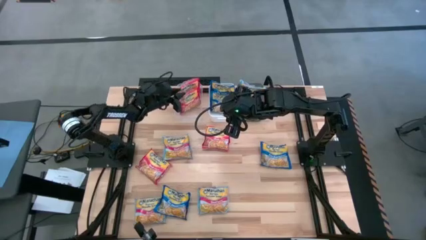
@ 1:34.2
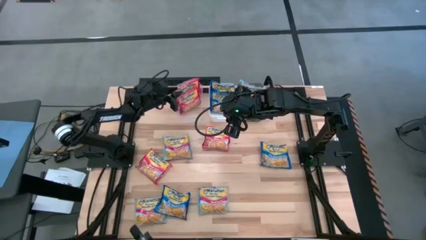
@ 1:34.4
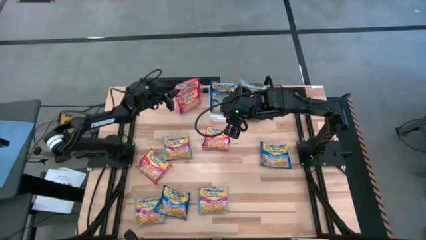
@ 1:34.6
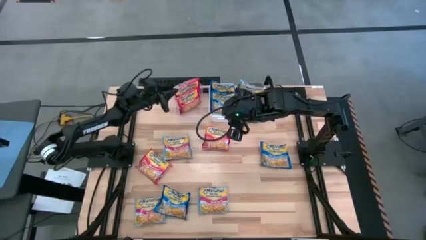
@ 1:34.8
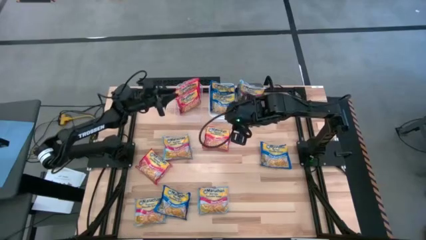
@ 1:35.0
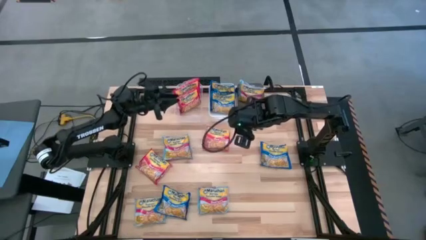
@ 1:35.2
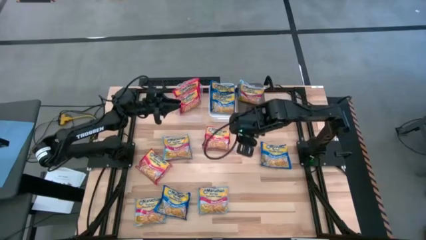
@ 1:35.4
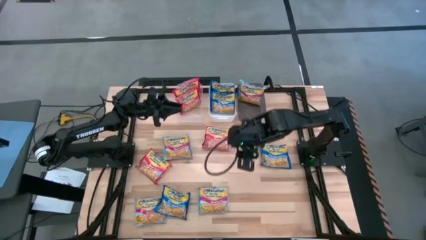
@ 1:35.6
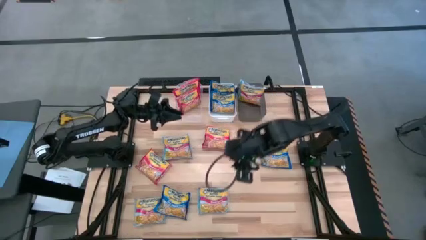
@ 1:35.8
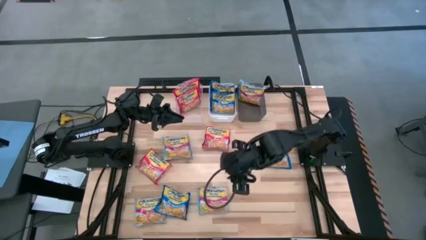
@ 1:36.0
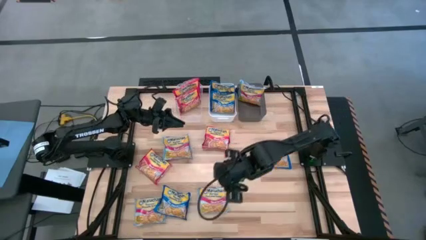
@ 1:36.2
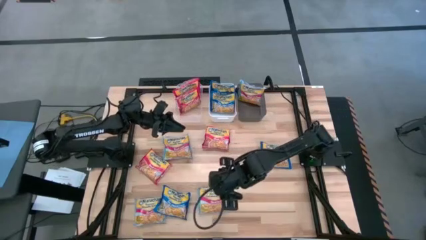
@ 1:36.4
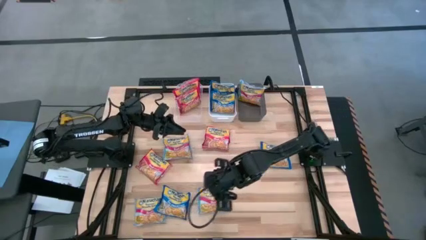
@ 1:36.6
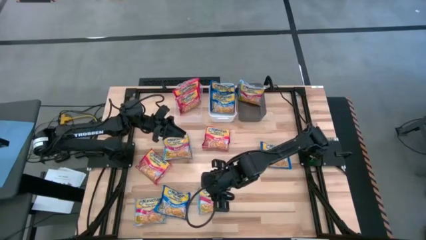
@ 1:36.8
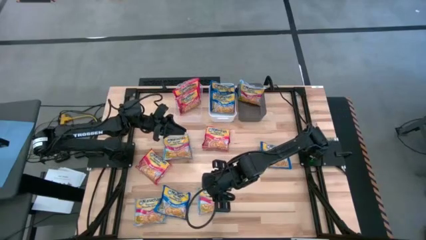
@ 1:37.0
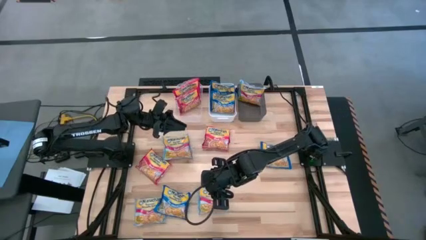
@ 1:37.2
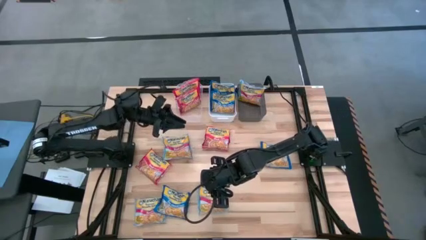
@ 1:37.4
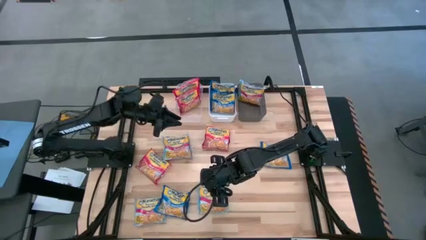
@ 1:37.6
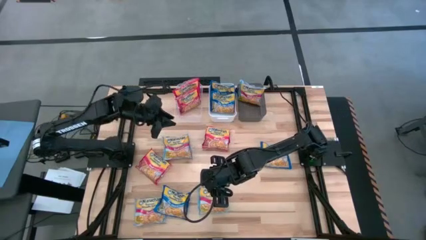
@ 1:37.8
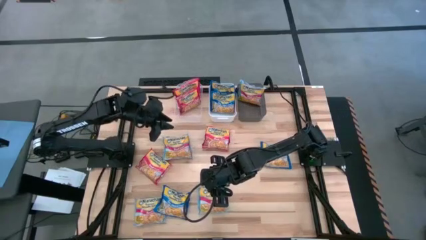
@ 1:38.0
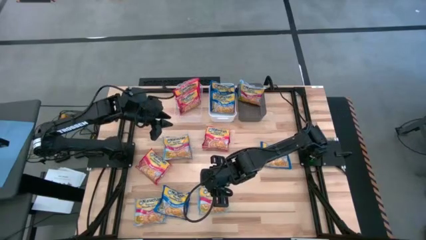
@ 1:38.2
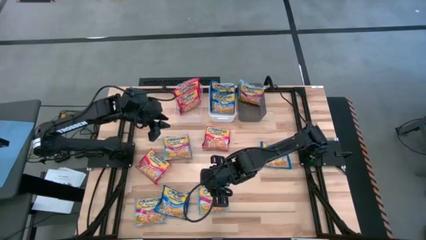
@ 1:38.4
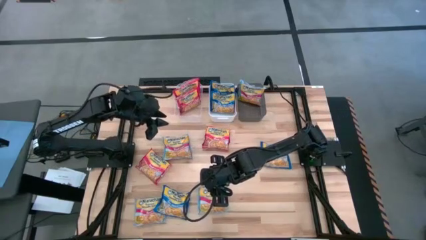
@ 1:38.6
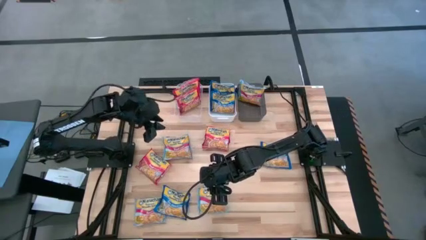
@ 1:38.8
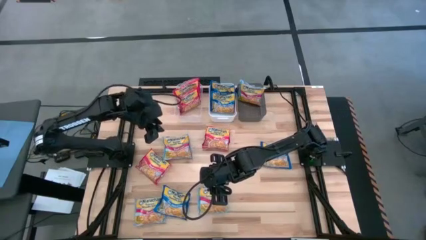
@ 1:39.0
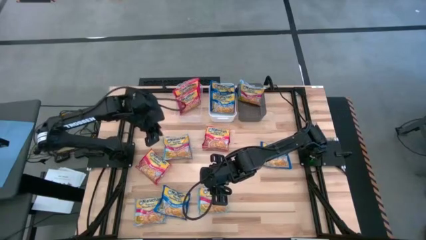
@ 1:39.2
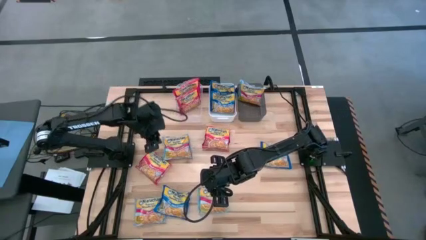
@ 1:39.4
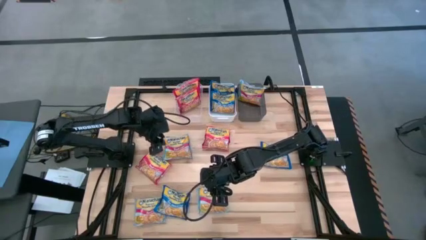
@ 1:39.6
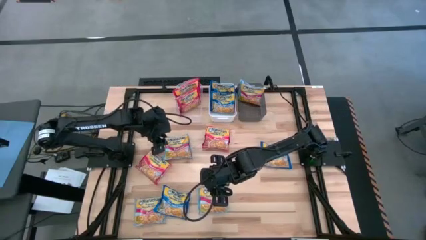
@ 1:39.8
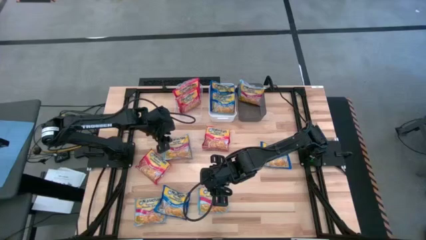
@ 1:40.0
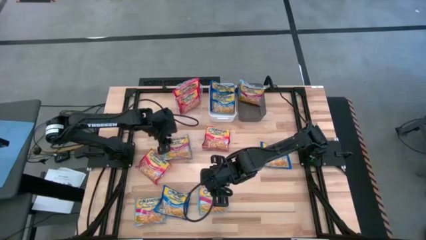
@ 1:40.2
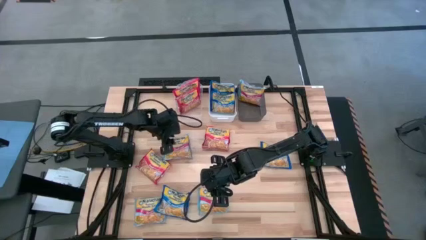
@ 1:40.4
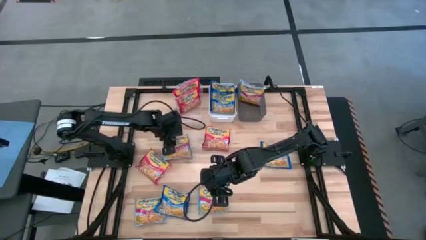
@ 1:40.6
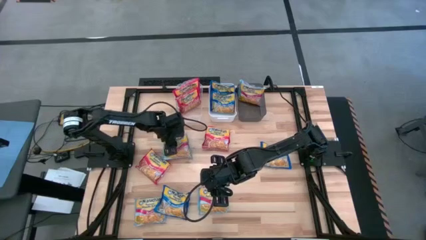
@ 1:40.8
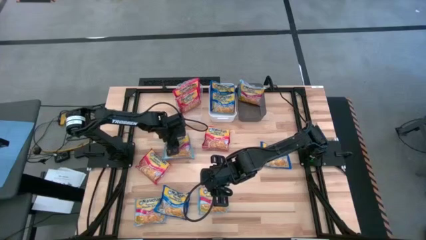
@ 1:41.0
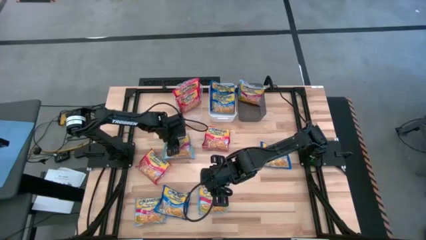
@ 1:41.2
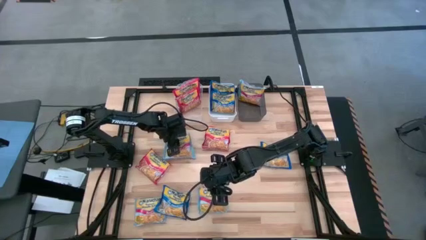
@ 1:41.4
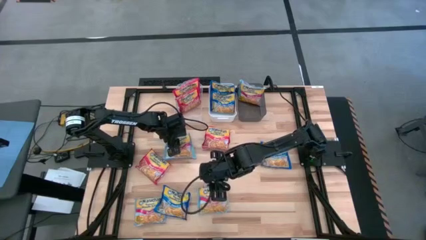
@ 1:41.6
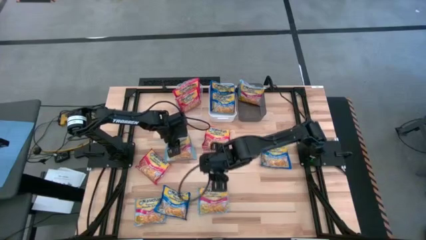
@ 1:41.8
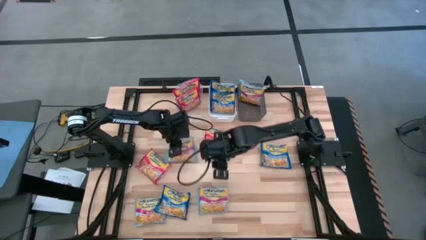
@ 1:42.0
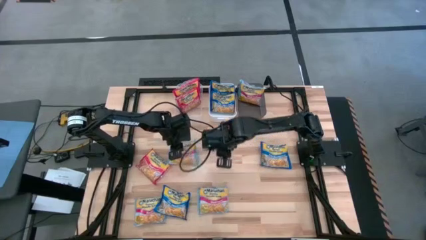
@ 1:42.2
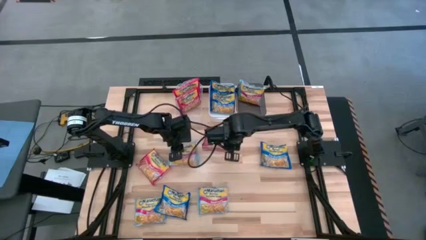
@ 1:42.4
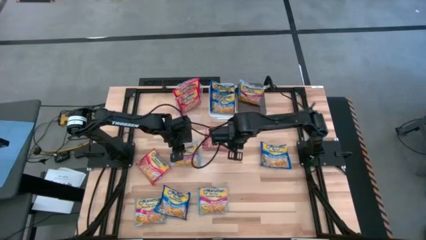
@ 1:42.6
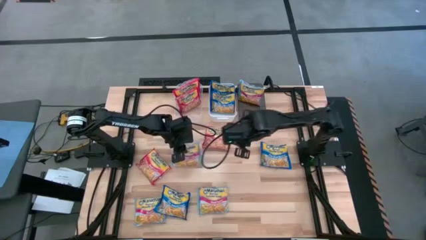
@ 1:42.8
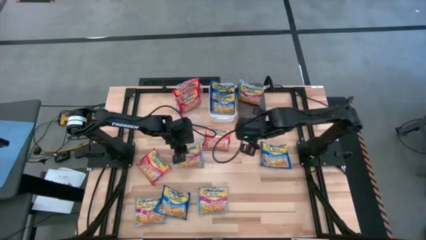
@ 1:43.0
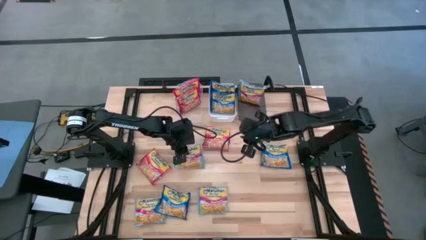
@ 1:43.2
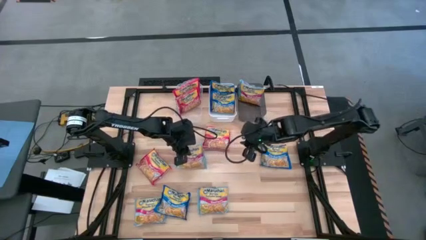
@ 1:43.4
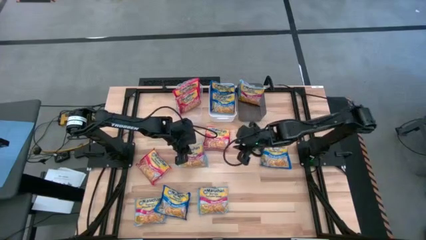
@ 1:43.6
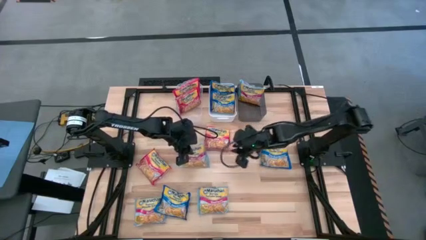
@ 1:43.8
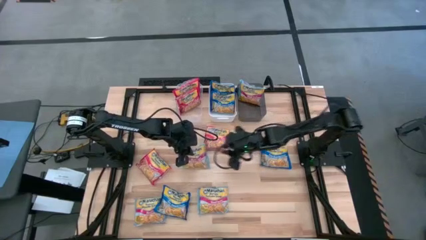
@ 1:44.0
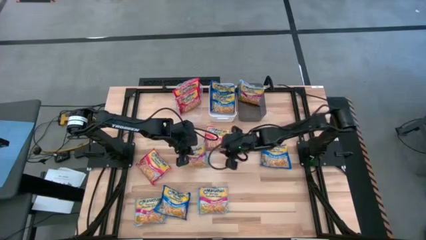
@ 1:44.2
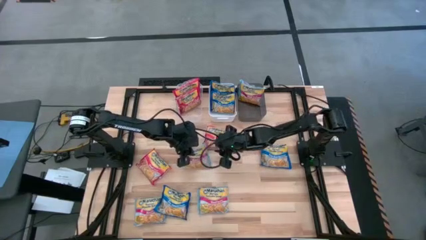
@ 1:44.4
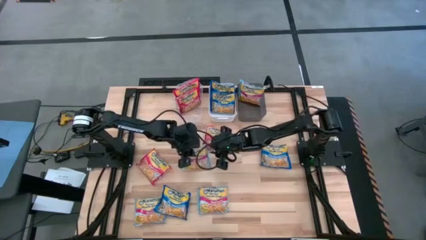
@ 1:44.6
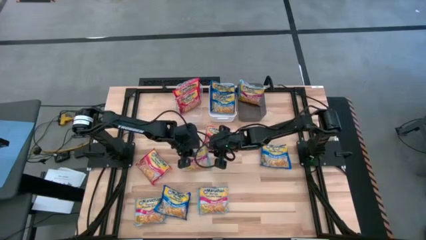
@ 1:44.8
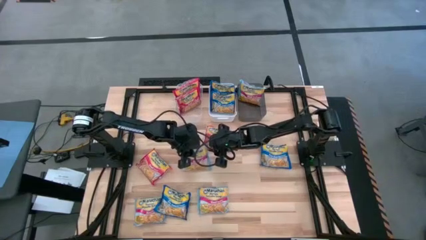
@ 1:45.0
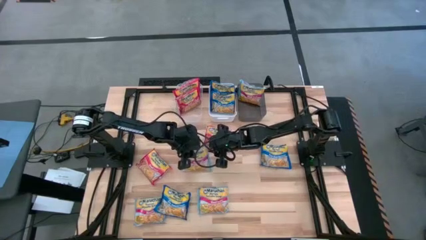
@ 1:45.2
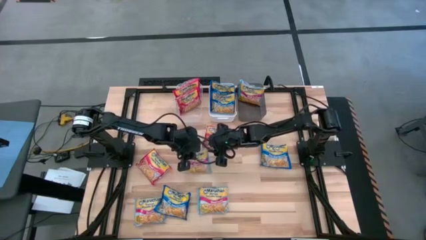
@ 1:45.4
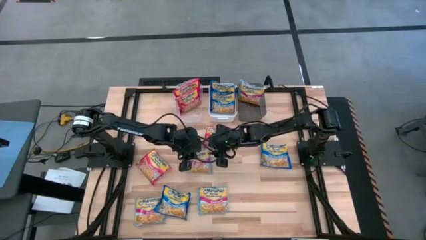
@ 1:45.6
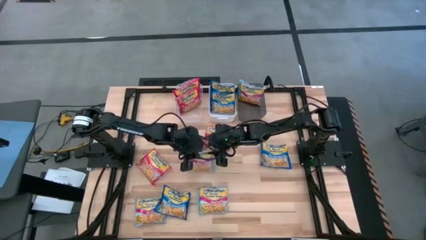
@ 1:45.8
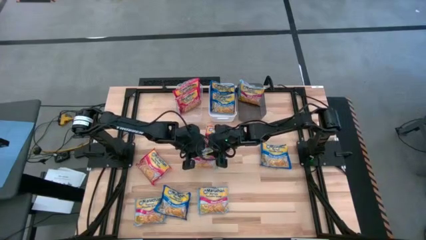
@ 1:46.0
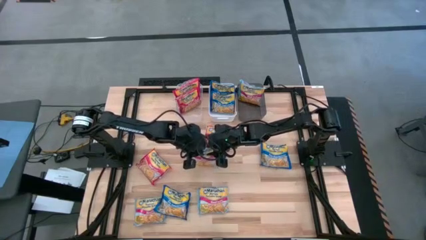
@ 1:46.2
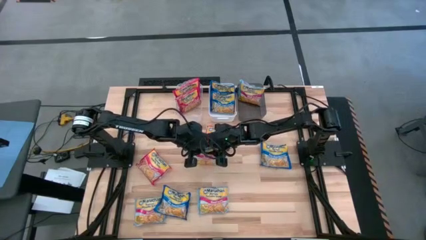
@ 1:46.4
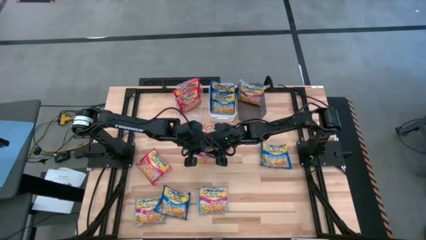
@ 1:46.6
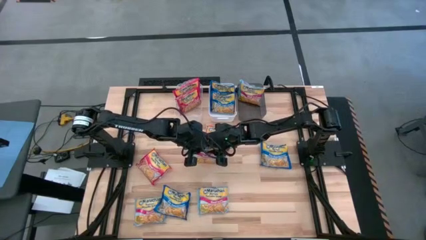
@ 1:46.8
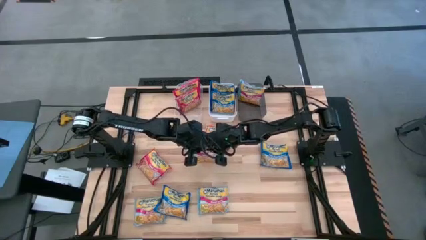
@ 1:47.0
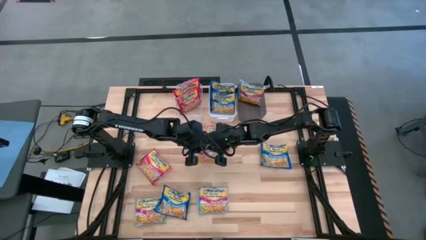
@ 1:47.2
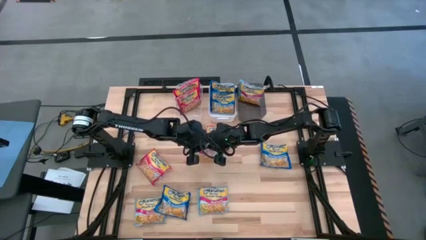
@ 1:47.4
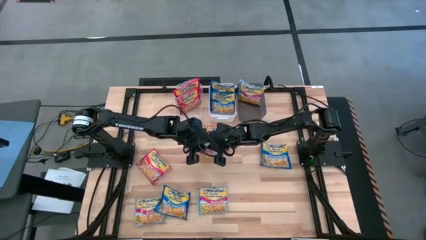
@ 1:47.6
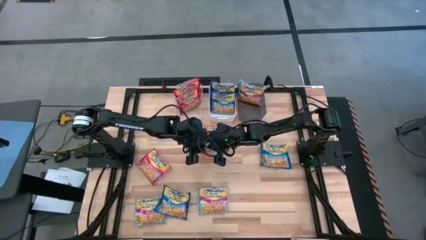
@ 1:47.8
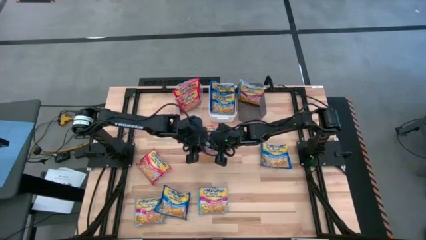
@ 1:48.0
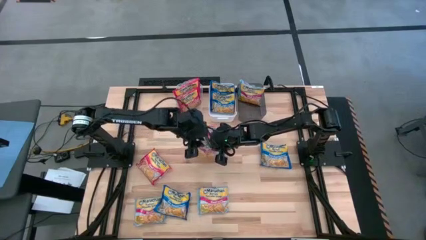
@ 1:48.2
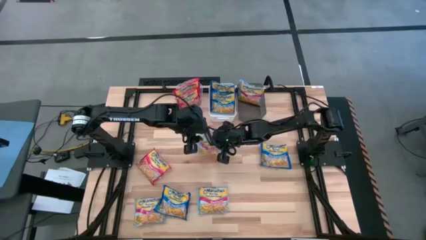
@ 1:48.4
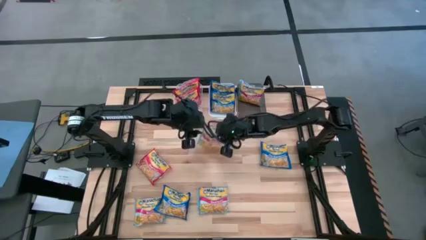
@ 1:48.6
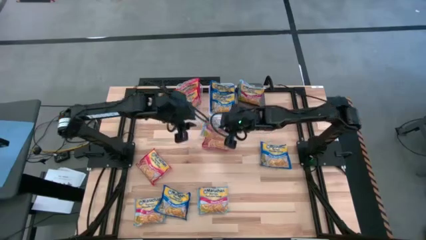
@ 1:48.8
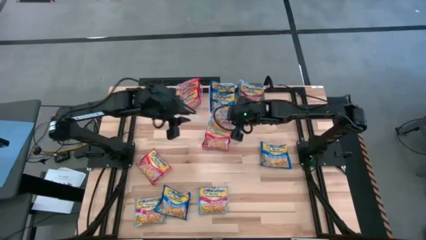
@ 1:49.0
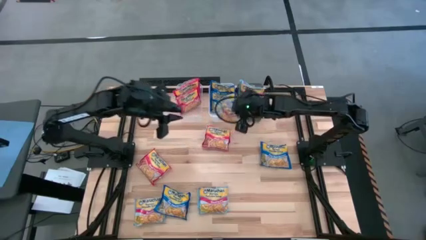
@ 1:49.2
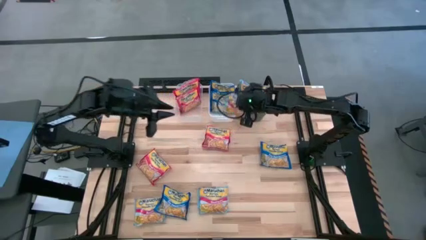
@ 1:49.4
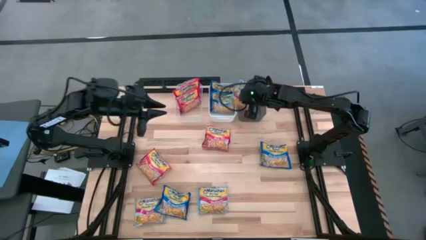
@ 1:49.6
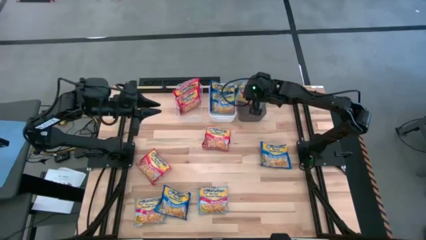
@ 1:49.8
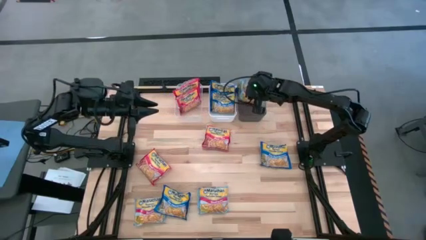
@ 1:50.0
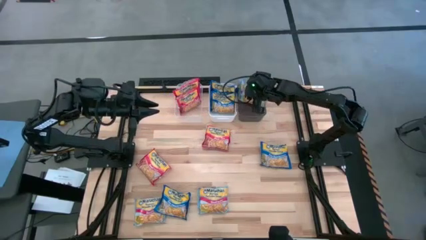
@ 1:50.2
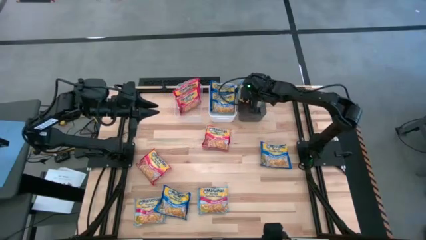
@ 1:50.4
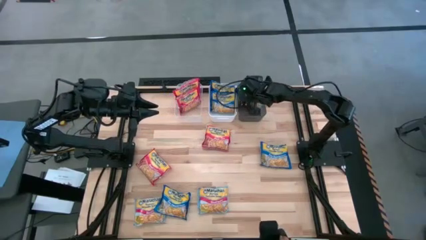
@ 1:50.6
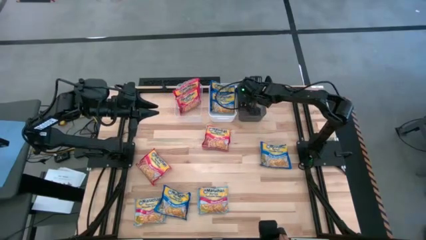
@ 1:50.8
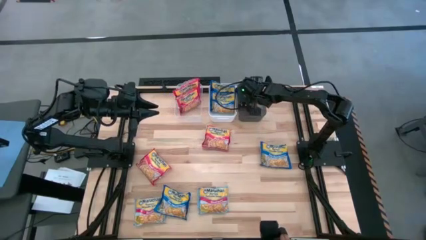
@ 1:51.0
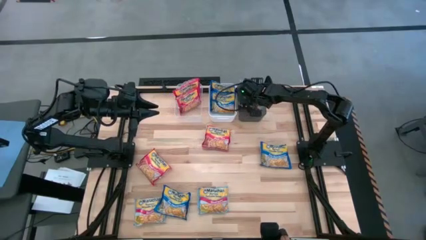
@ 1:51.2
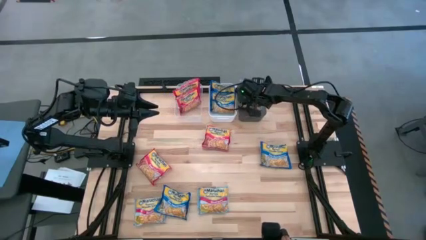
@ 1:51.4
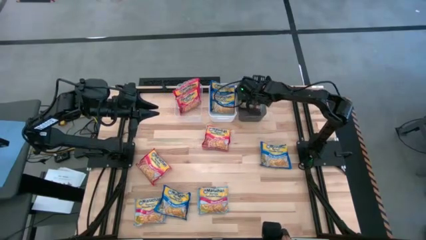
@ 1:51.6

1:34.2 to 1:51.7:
Task: Sort Maruchan noodles
Put the light blue noodle pack into the black bin
